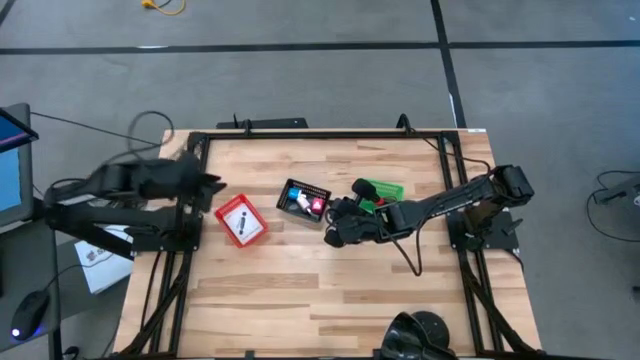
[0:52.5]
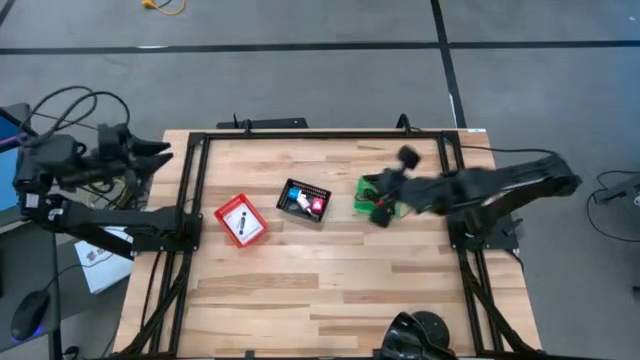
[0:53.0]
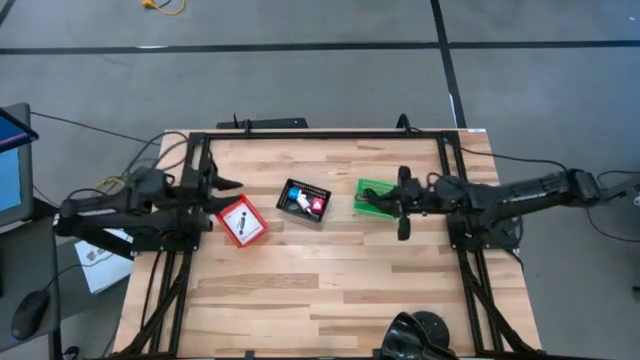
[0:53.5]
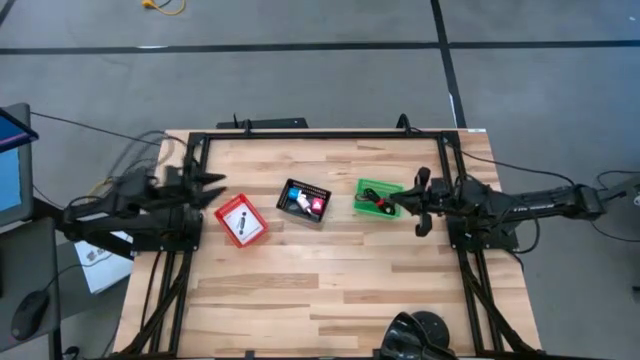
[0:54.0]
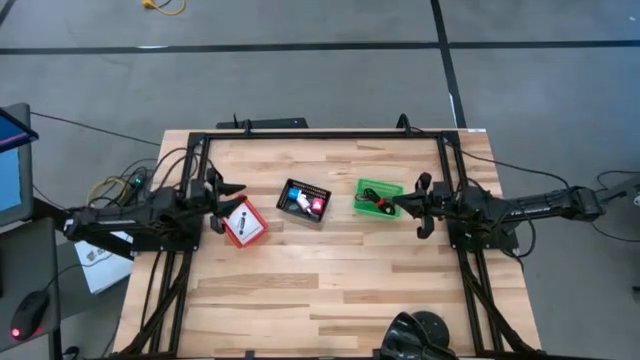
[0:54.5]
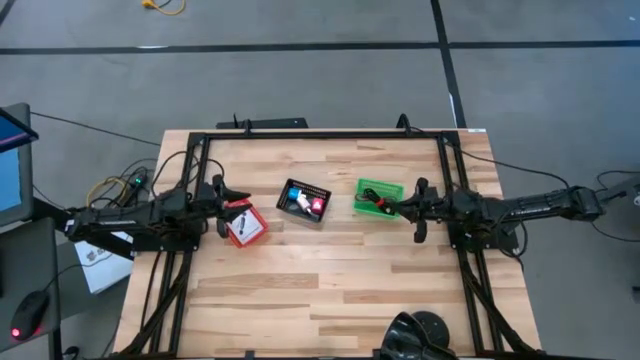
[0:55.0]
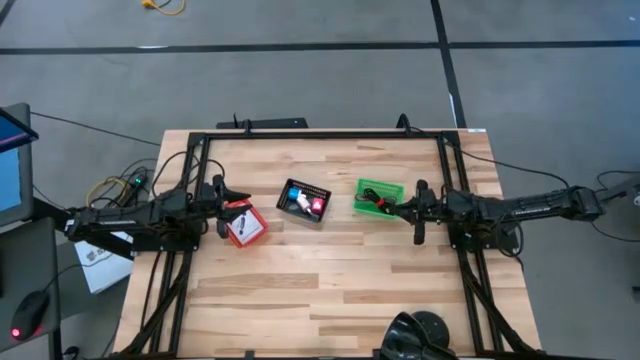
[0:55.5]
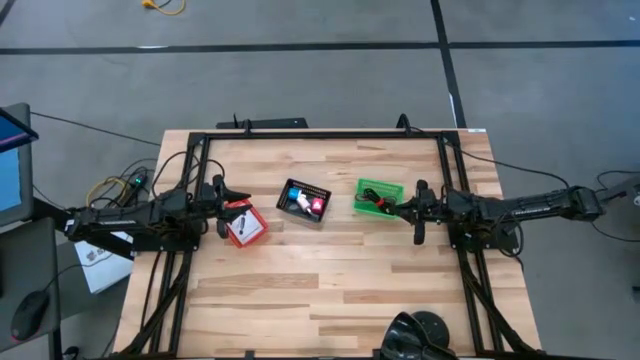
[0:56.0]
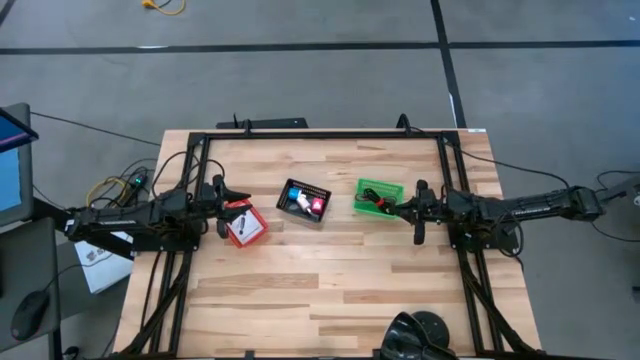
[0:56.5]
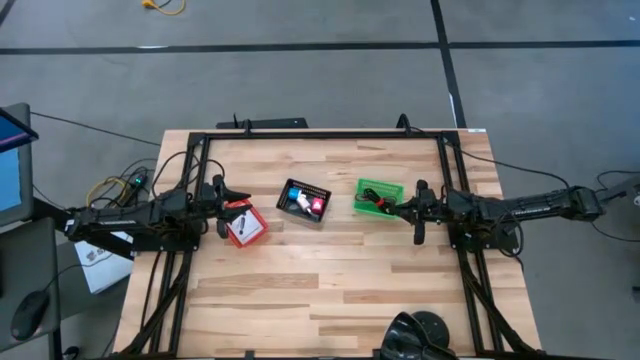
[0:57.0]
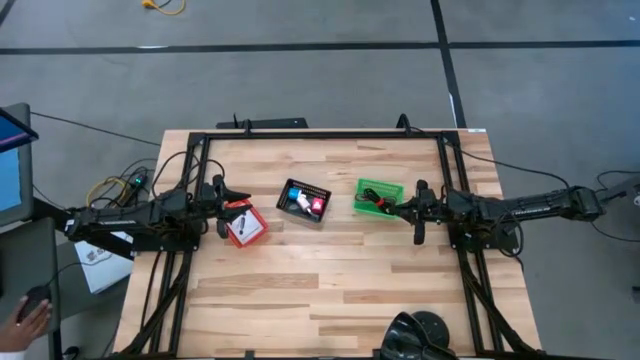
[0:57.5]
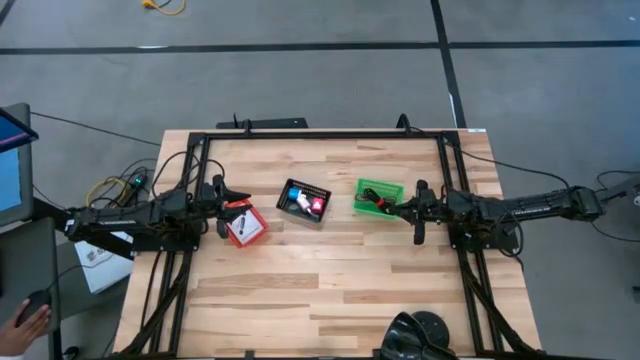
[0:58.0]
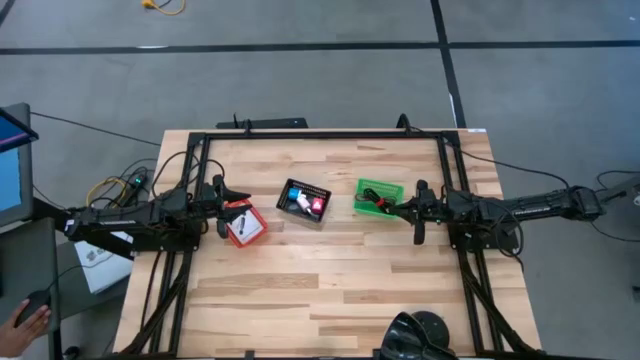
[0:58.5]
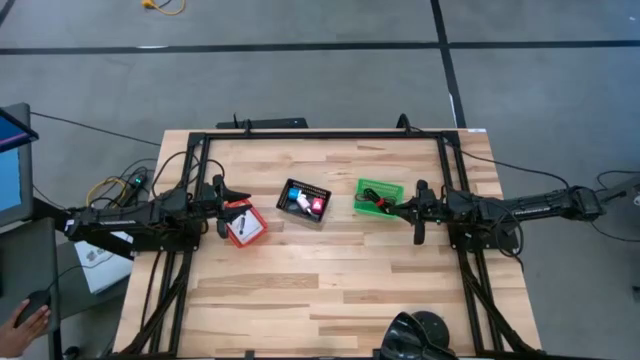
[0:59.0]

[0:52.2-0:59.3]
Task: Pick and place items into bin
Return to Home Position

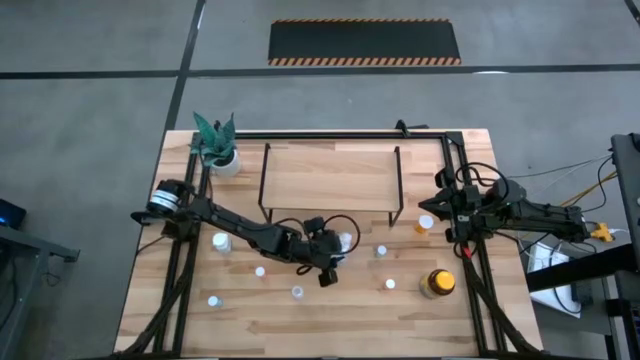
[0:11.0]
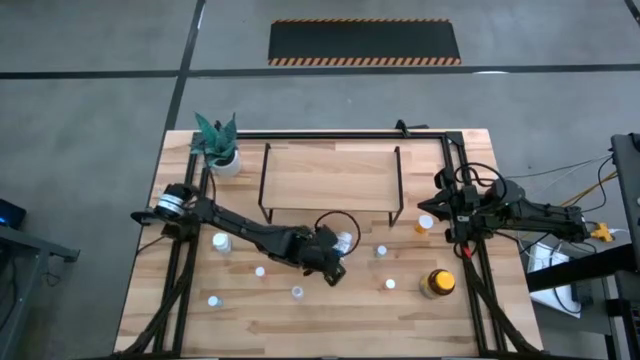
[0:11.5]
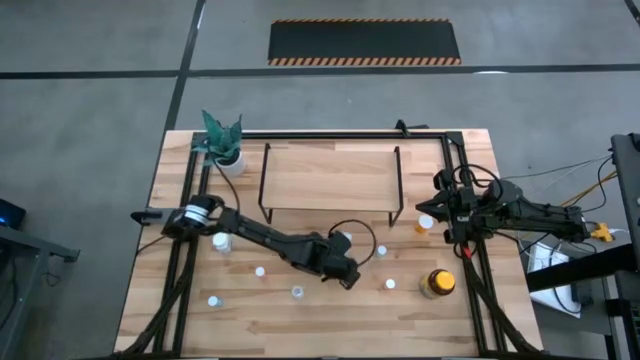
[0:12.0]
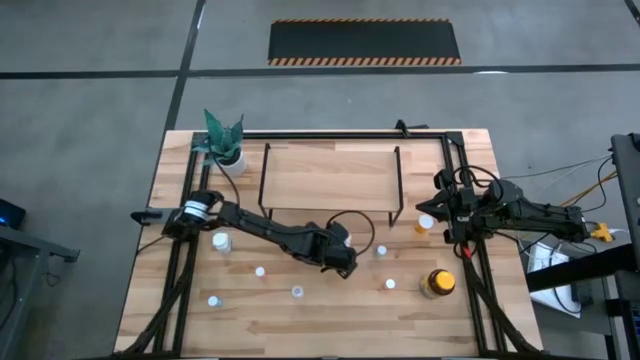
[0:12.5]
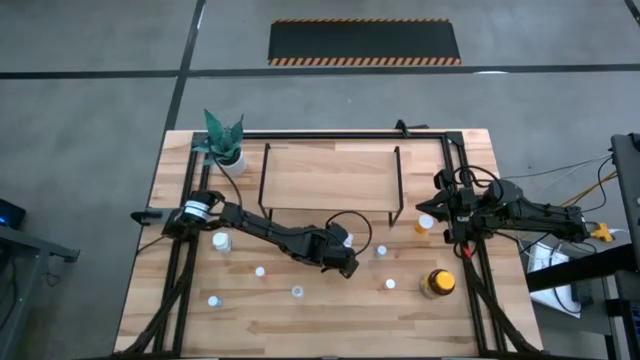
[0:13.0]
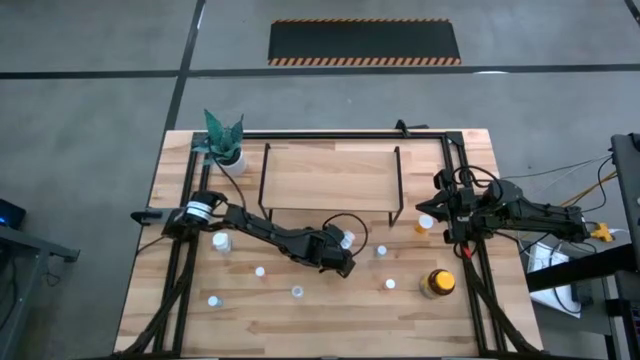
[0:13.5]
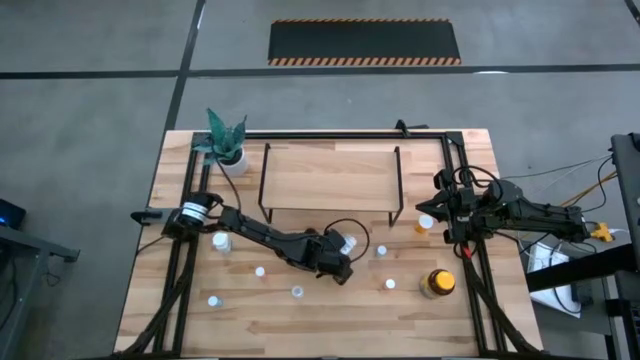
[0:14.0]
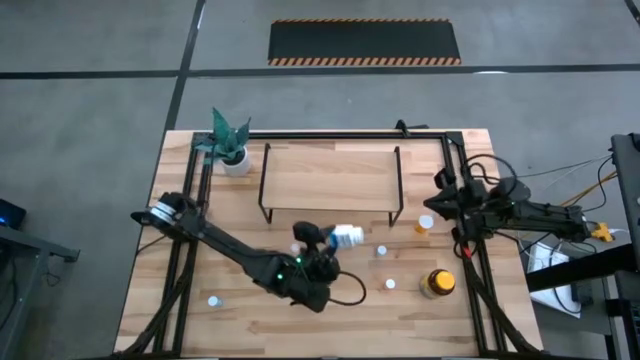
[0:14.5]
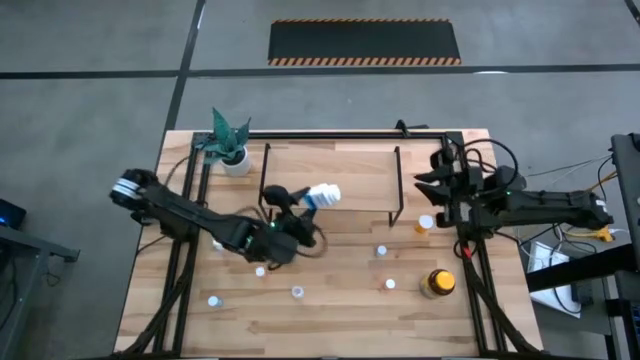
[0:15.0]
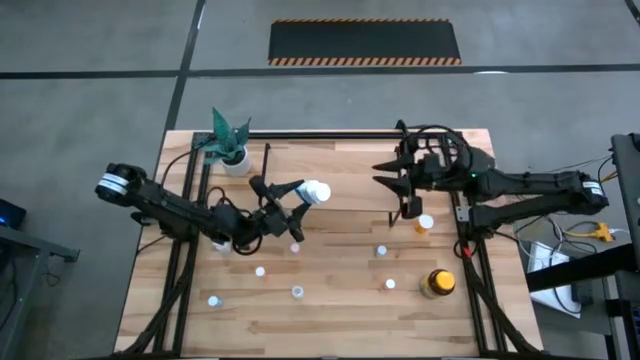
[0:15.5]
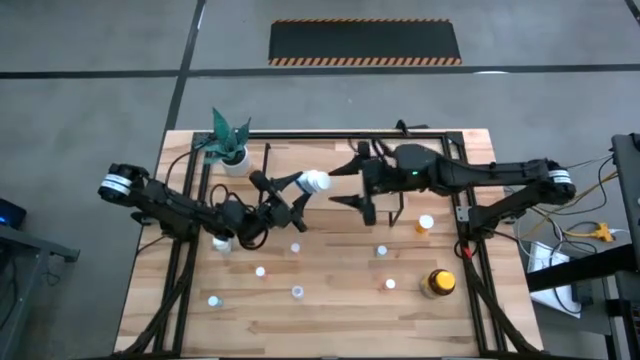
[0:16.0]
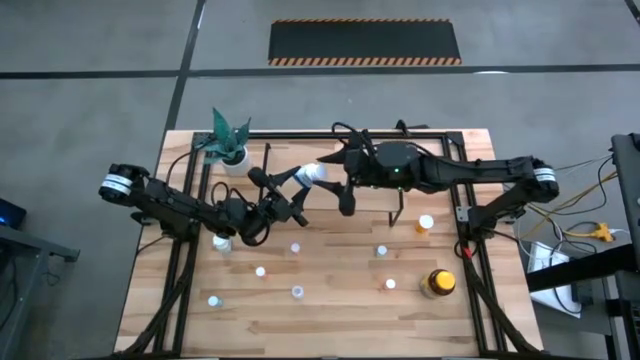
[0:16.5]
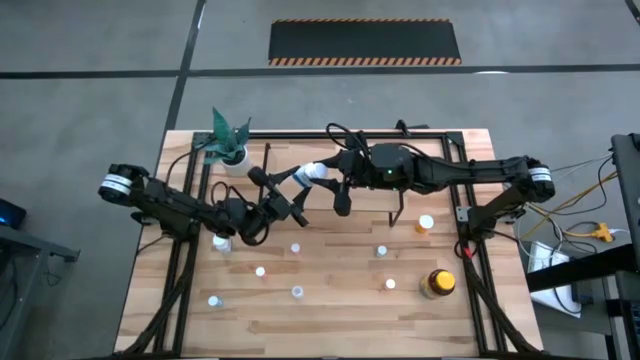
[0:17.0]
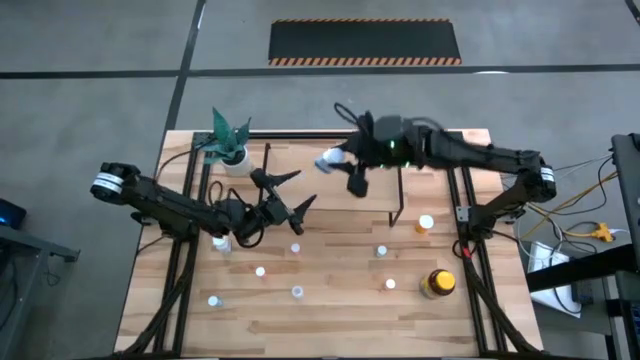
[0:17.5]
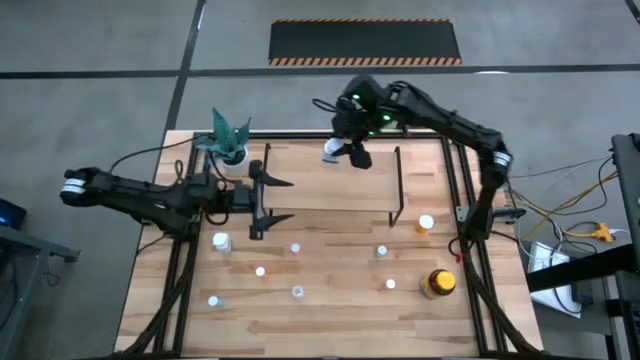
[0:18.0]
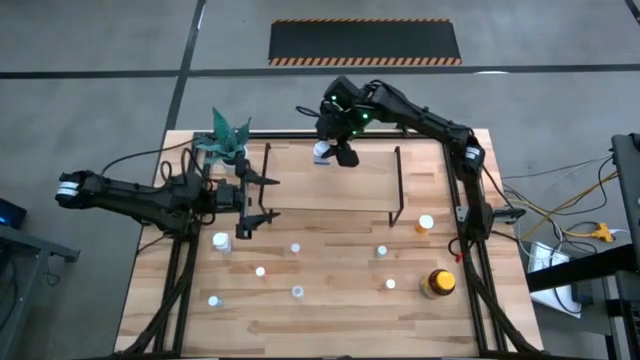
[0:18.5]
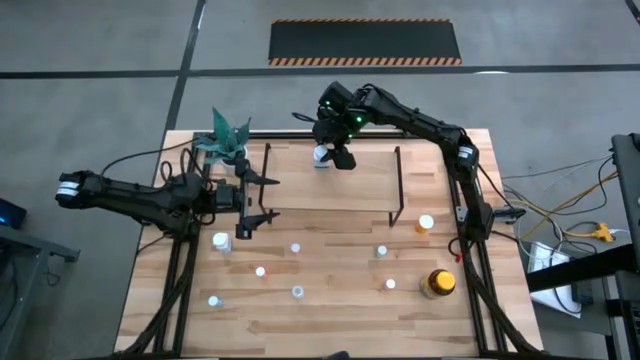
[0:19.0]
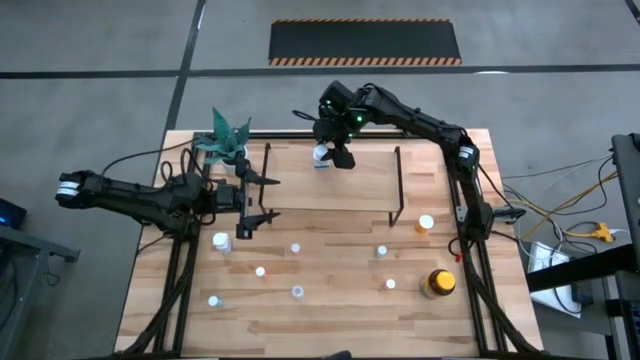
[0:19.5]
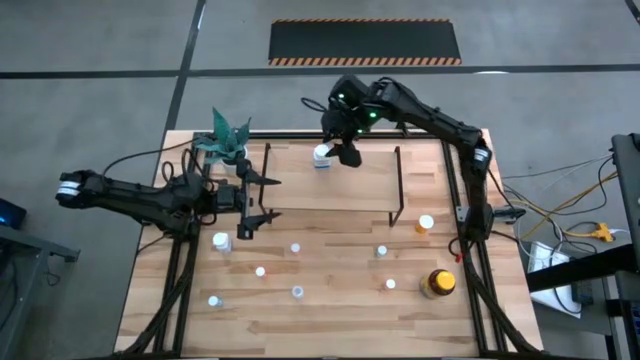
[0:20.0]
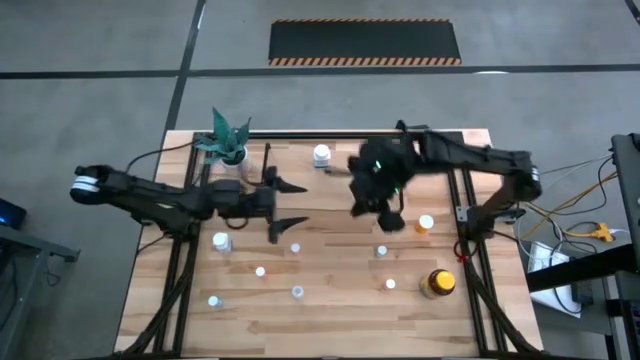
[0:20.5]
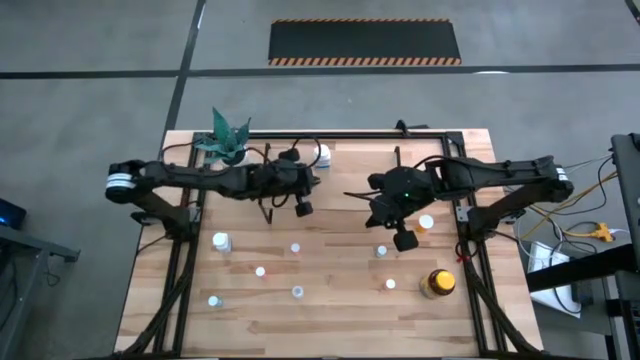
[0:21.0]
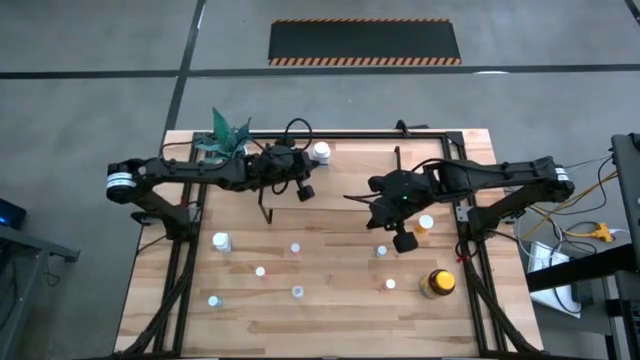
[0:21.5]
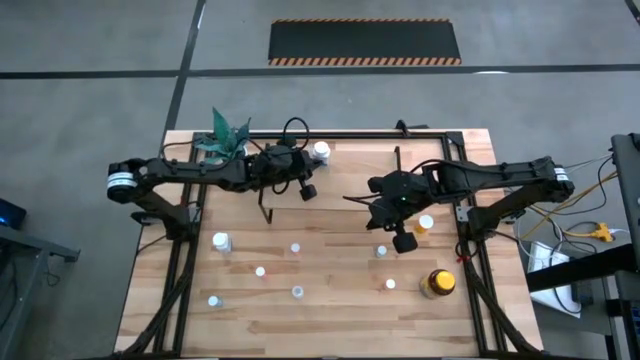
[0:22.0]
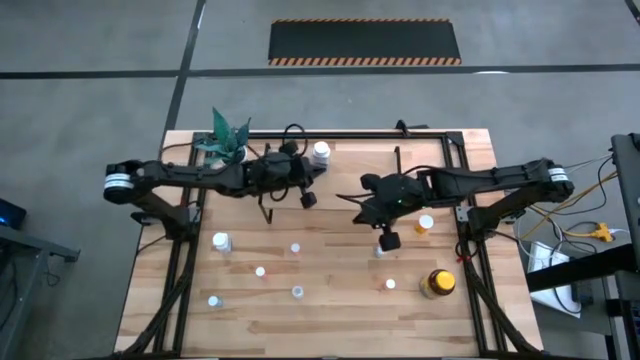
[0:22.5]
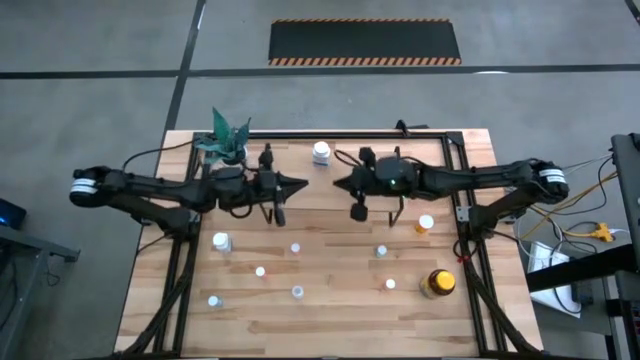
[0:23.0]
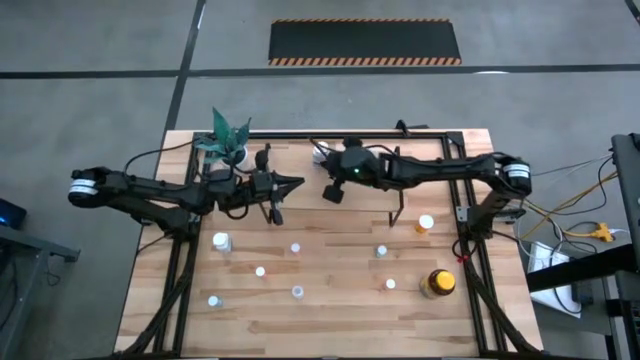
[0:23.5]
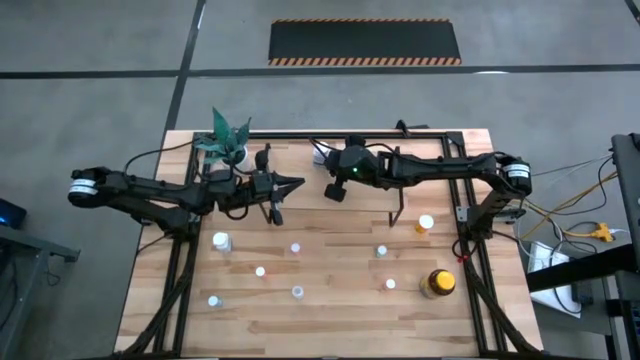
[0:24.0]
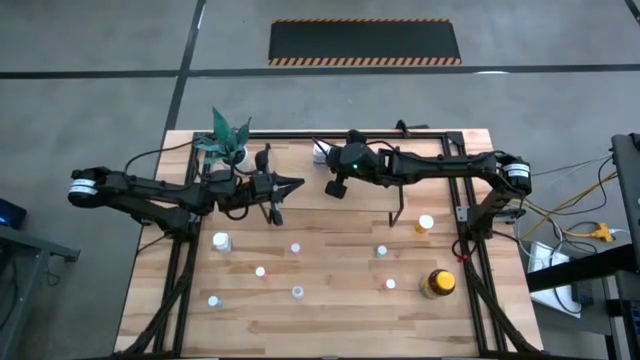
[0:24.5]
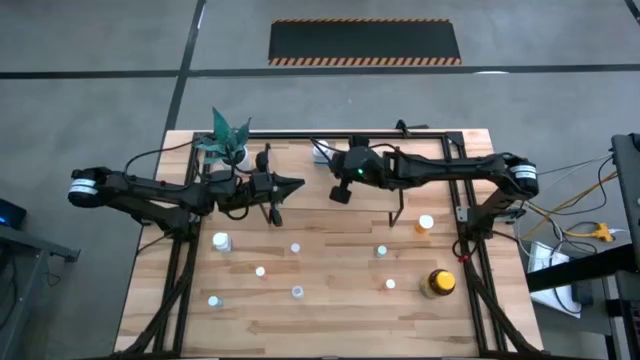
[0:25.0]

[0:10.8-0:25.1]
Task: Pick and place medicine bottles onto shelf by color
Put the right white medicine bottle on the shelf
